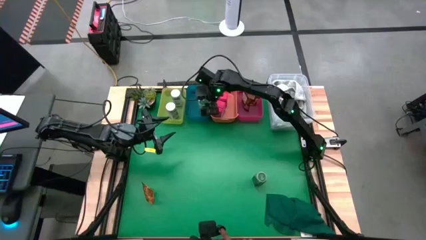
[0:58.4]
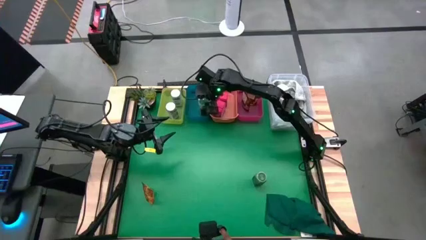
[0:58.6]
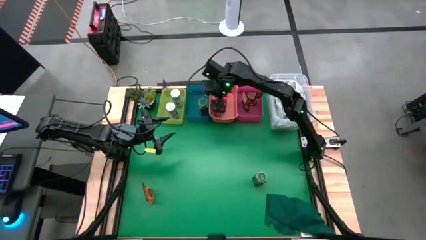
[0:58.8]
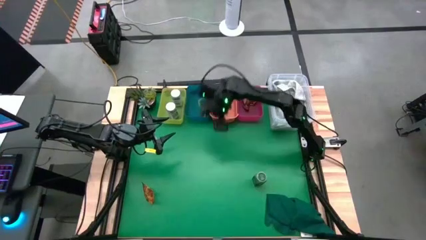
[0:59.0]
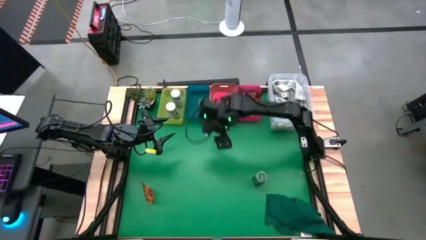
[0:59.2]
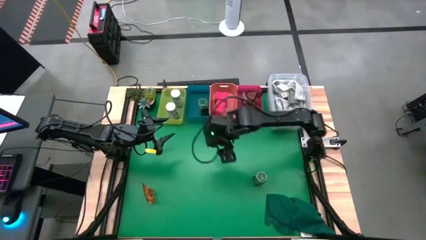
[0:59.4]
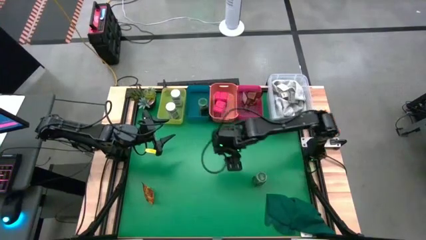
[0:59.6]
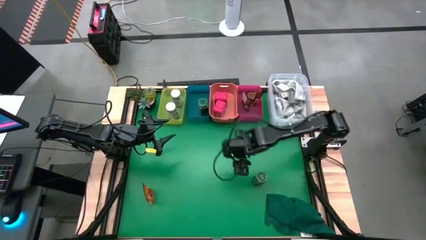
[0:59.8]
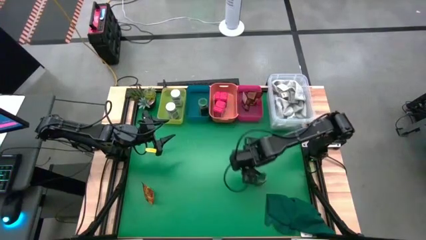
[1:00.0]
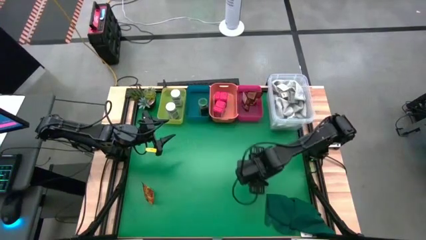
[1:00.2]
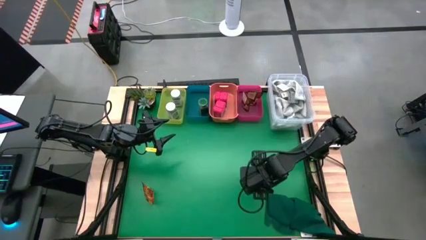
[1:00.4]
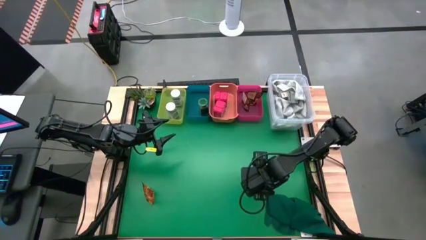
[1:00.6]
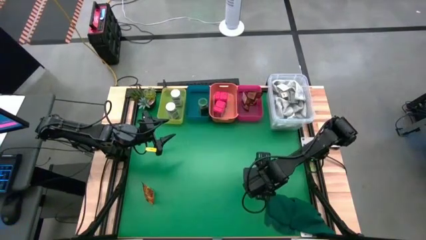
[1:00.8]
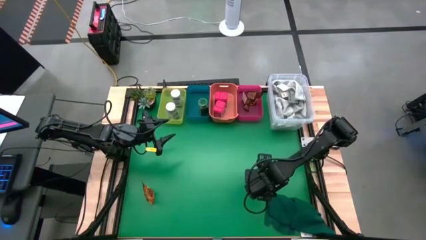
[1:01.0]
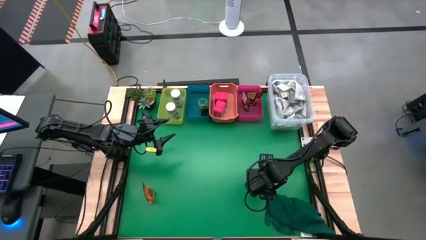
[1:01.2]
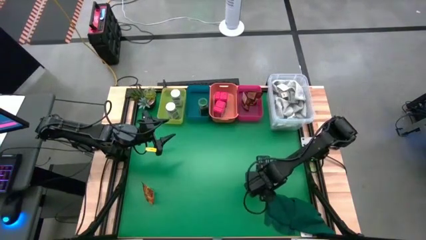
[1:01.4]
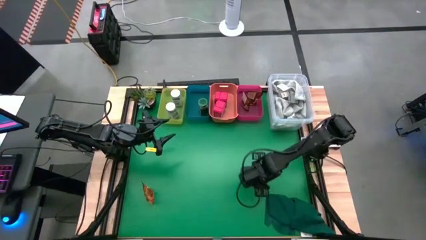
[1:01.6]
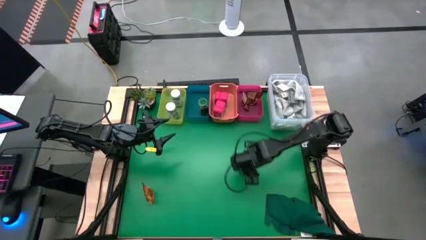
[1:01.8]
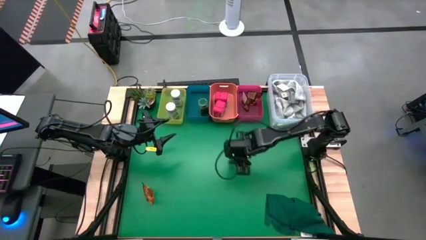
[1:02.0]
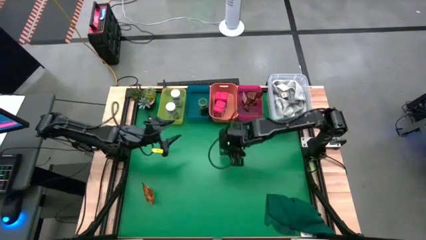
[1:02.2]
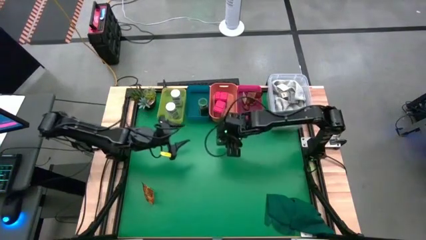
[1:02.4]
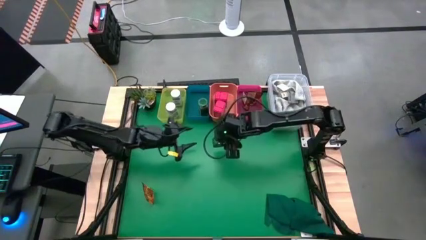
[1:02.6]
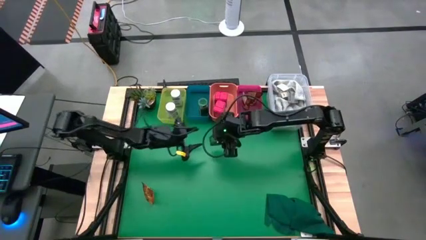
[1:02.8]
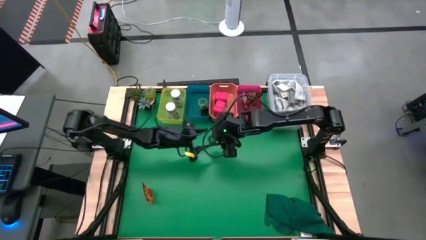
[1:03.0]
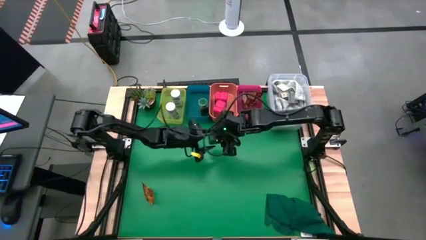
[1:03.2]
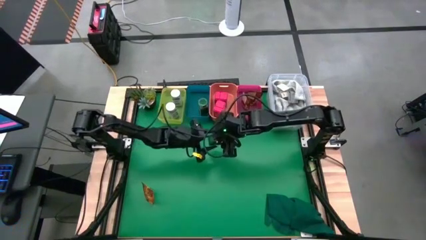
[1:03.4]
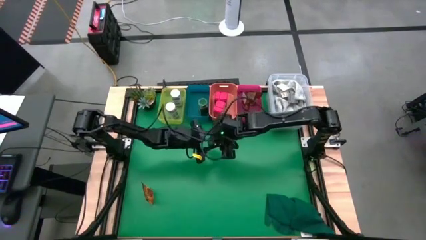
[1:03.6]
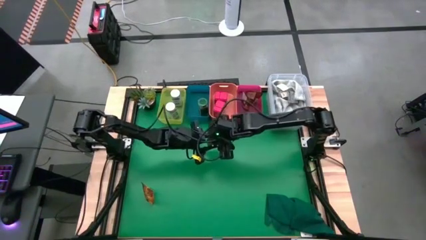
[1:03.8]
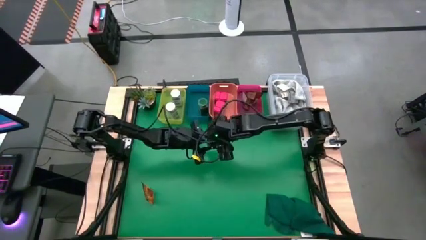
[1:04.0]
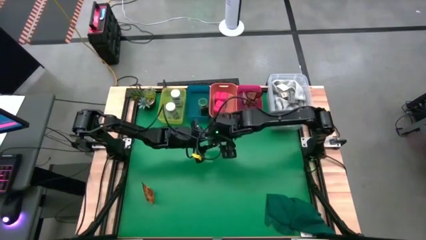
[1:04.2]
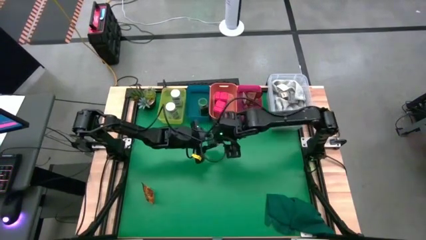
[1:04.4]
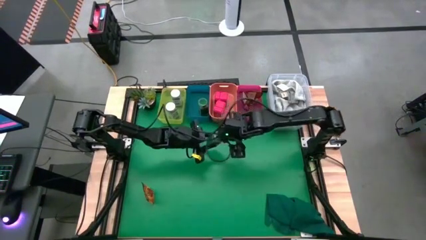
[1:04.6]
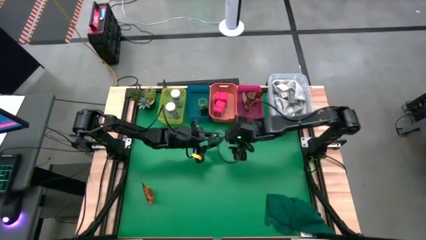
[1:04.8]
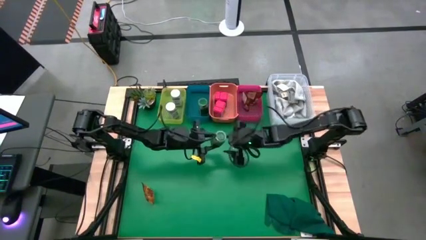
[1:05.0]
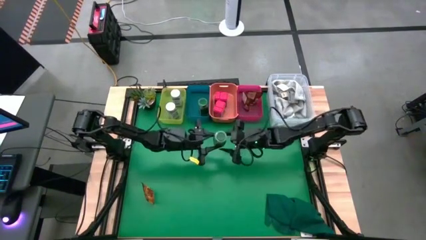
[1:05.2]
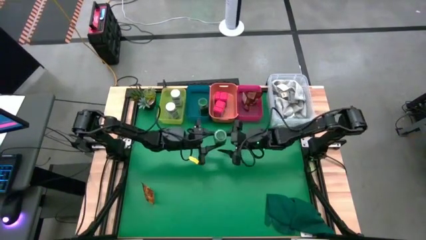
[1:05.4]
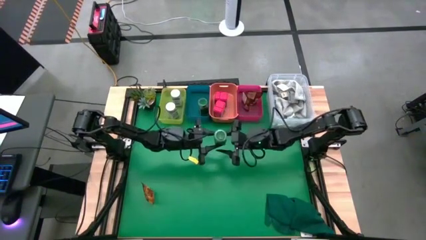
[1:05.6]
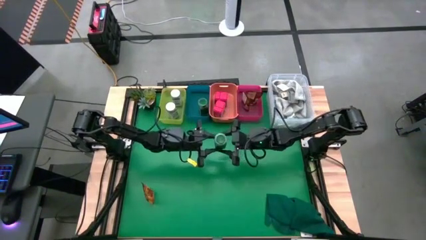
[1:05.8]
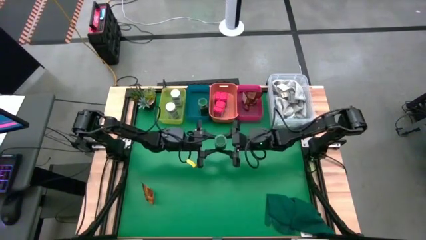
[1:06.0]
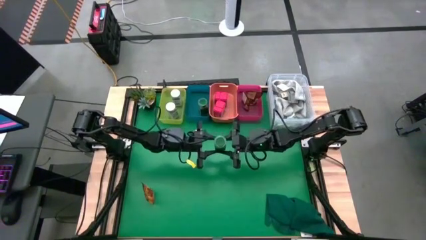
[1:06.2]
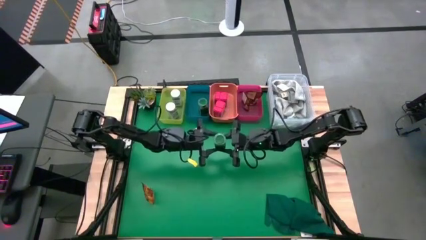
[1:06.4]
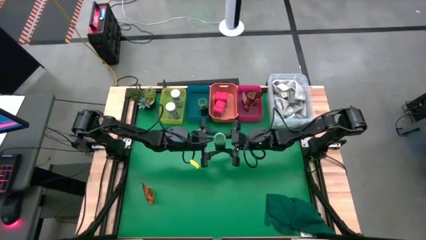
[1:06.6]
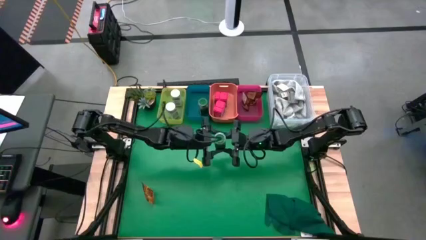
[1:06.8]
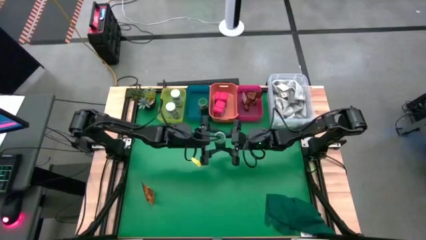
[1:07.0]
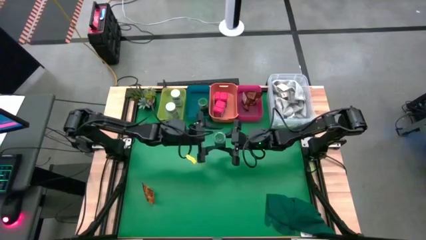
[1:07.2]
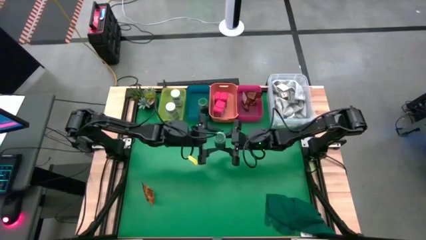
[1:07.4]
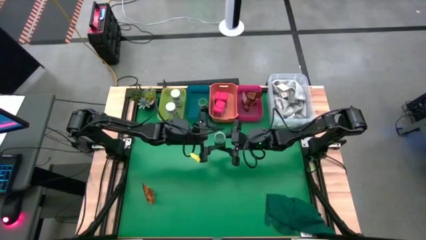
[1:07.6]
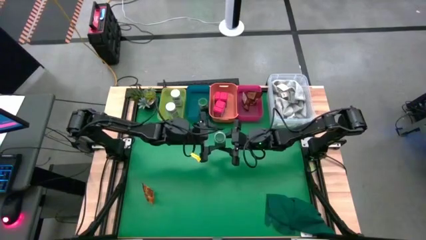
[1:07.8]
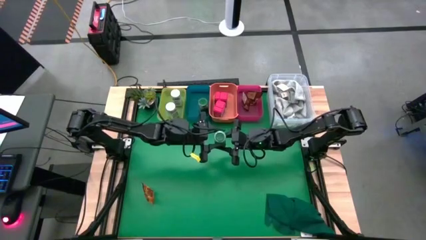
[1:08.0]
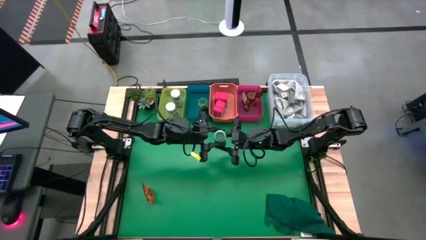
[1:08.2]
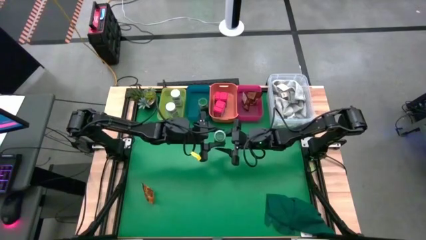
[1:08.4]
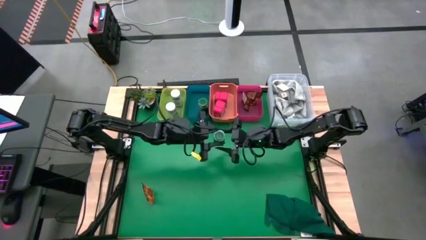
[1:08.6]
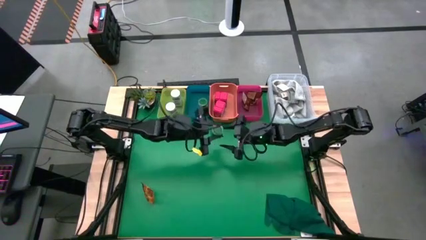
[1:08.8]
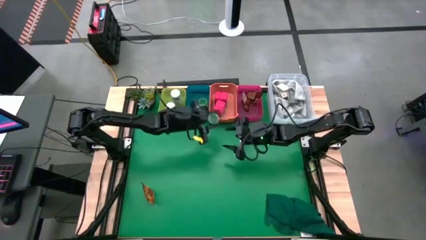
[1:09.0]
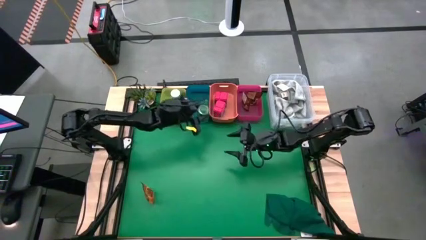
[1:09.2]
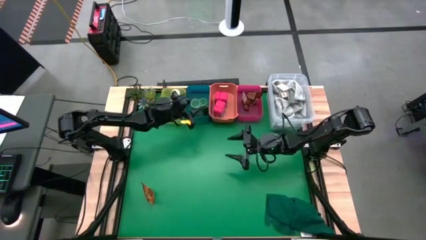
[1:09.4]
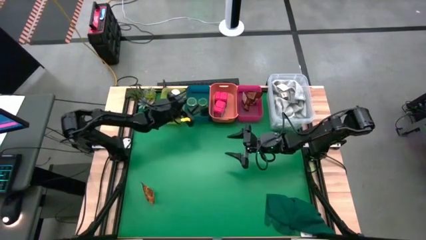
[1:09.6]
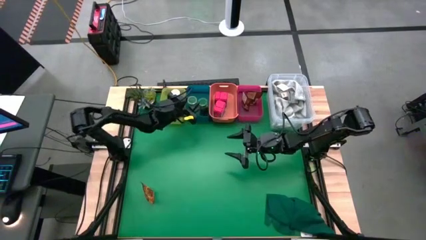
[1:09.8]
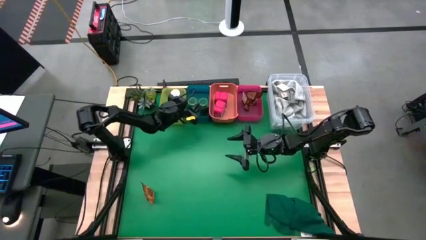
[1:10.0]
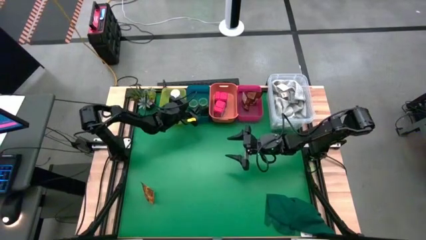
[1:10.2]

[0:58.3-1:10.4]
Task: Sort spices by type
Put the green seasoning bottle into the blue bin

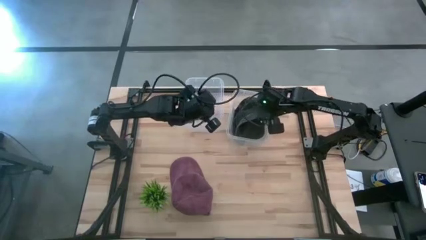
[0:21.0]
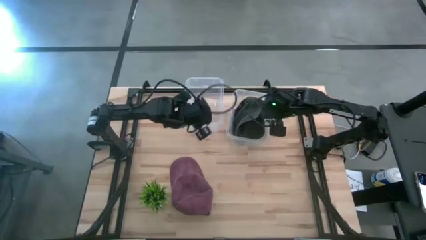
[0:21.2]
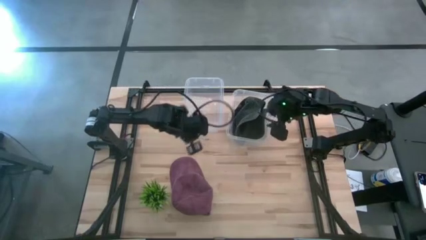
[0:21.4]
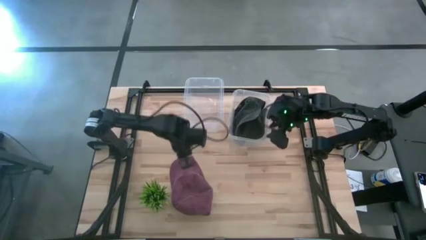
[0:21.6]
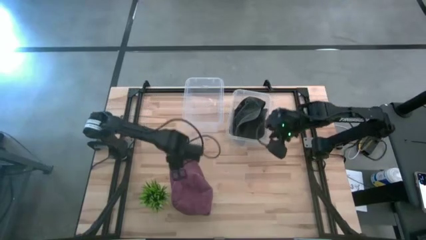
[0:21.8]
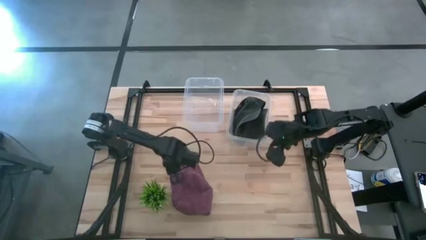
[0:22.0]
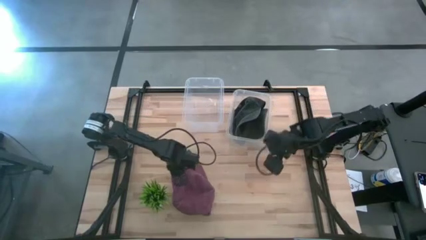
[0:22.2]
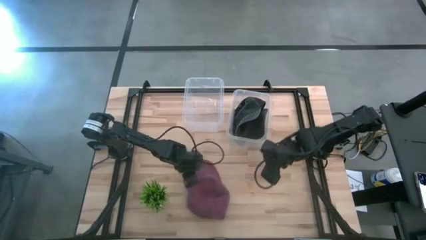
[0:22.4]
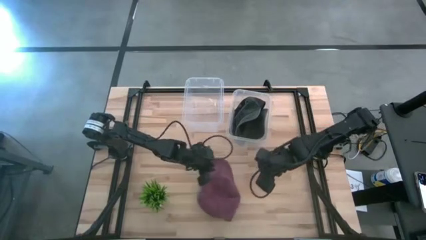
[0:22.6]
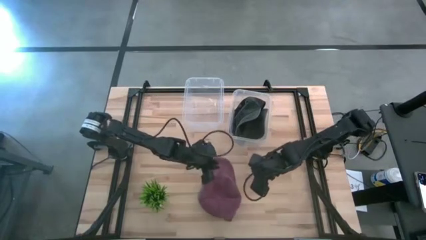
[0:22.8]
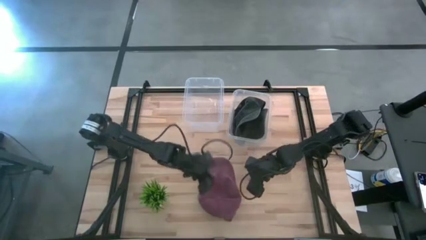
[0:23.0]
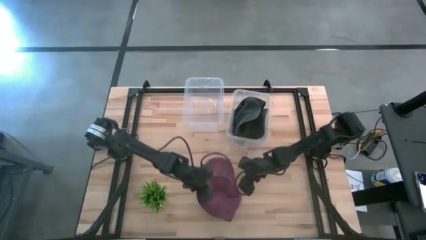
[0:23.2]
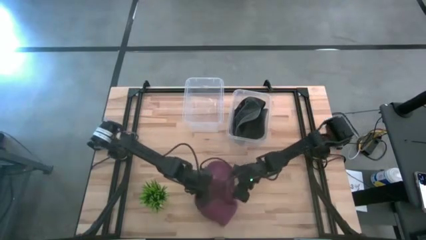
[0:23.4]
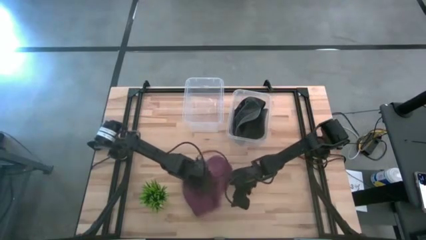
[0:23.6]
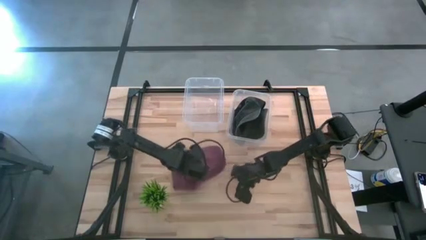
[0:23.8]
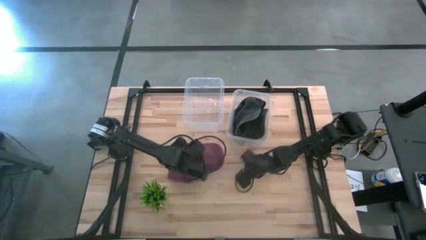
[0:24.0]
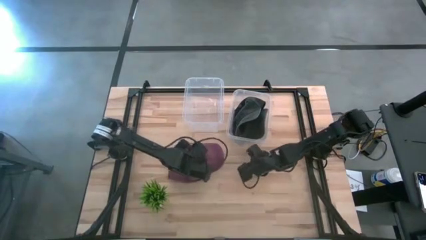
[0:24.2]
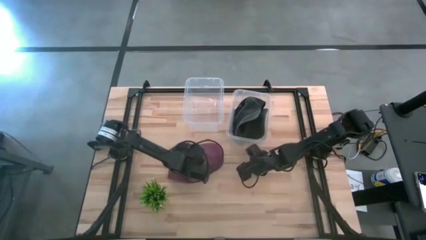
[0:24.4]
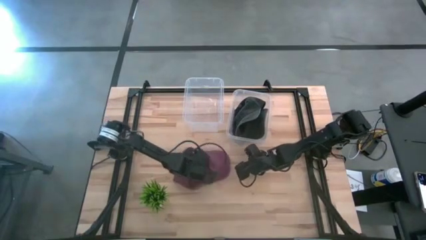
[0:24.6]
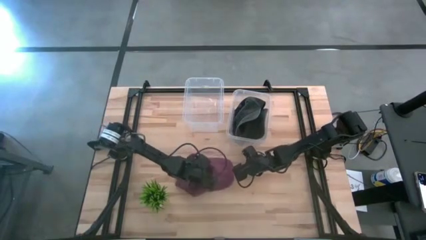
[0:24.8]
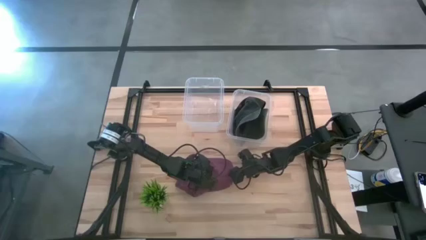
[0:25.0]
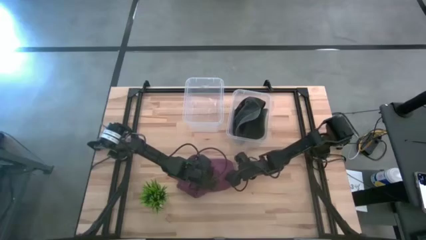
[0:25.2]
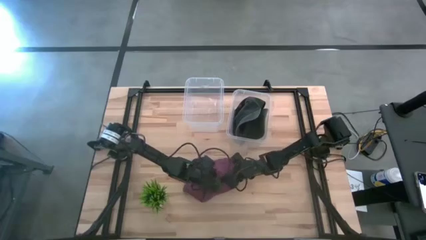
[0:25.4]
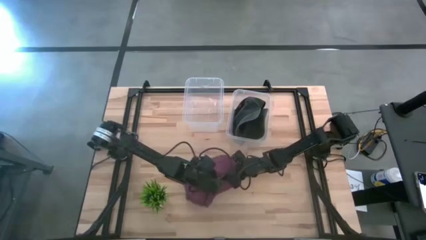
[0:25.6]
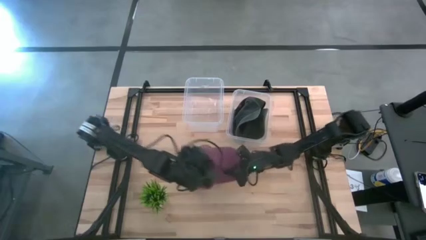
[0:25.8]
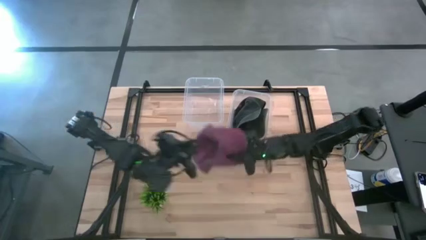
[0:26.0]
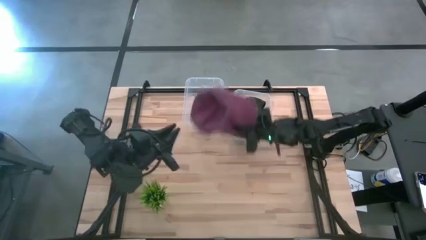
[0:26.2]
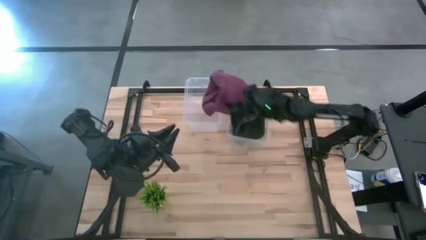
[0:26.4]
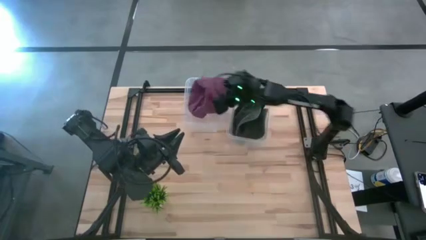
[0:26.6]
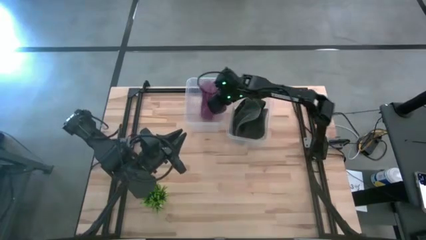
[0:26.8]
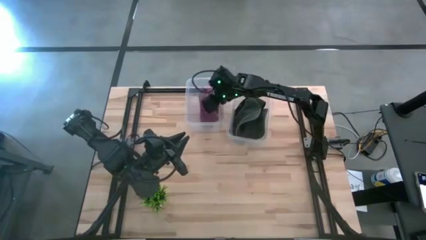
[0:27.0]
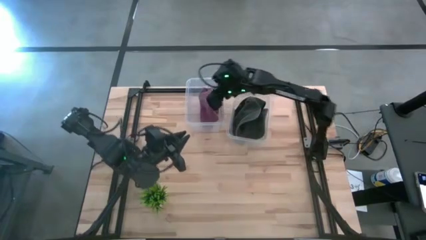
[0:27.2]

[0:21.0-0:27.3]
Task: Pick & Place hat
Put the red cap into the left transparent bin
